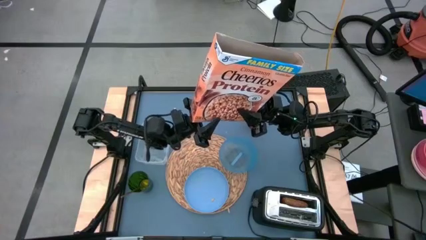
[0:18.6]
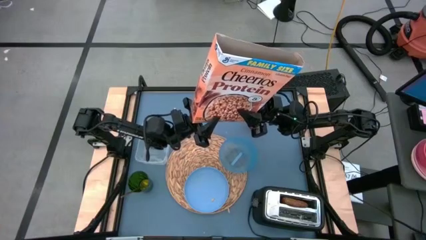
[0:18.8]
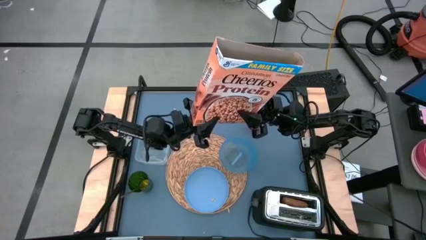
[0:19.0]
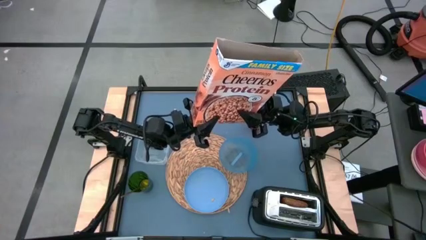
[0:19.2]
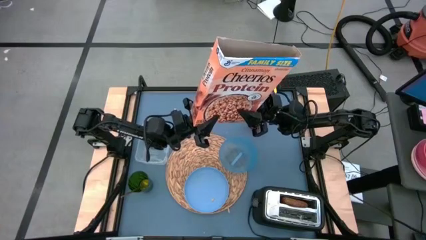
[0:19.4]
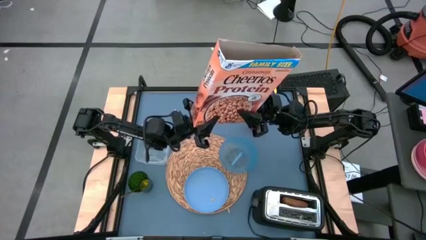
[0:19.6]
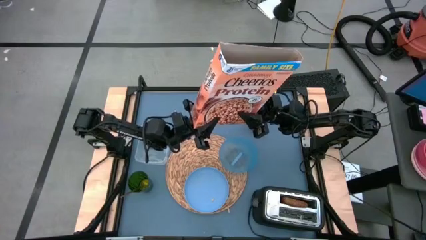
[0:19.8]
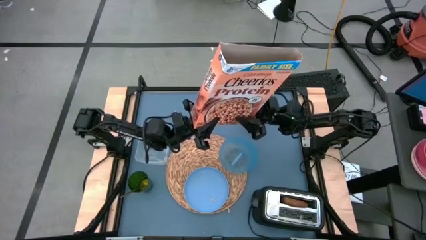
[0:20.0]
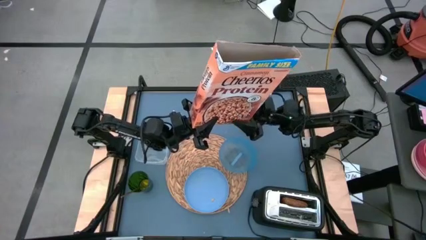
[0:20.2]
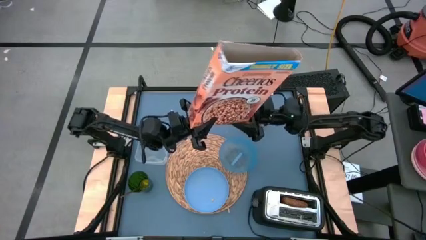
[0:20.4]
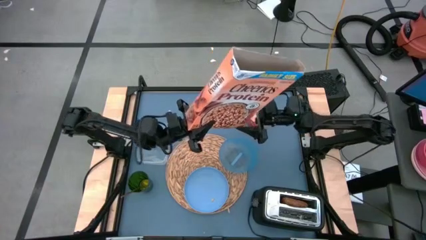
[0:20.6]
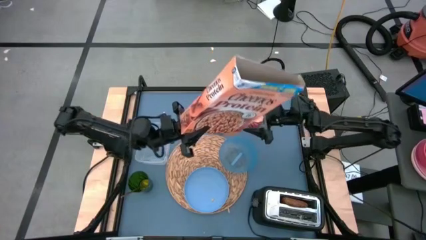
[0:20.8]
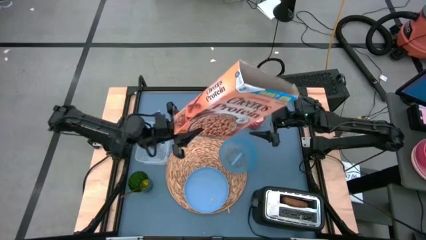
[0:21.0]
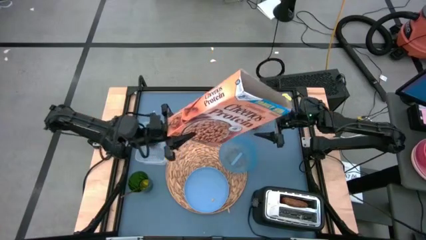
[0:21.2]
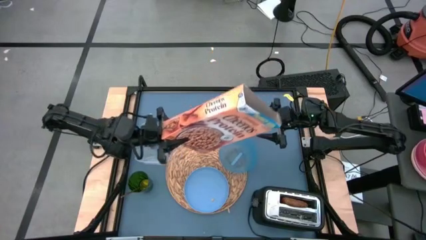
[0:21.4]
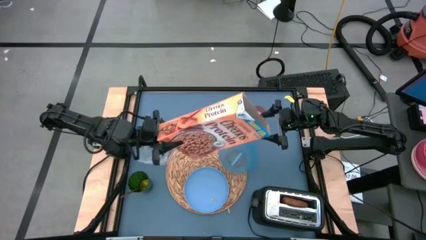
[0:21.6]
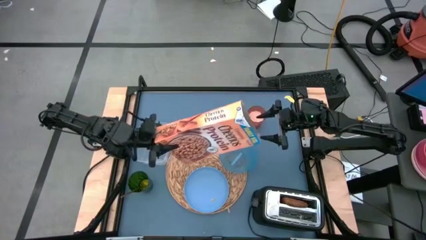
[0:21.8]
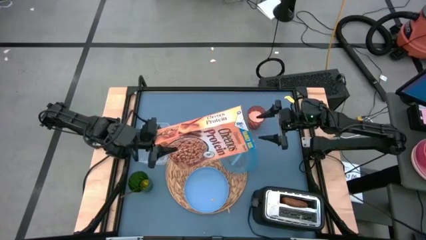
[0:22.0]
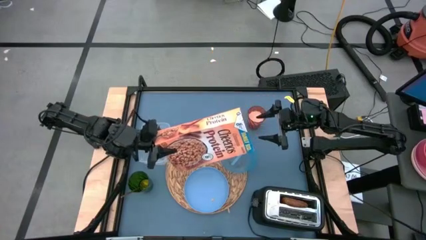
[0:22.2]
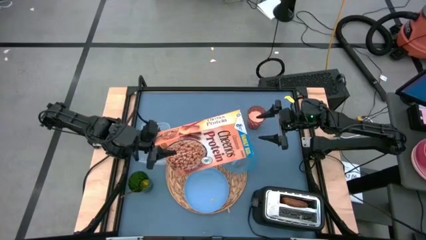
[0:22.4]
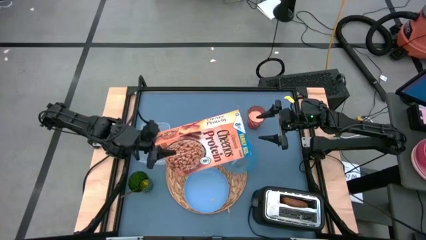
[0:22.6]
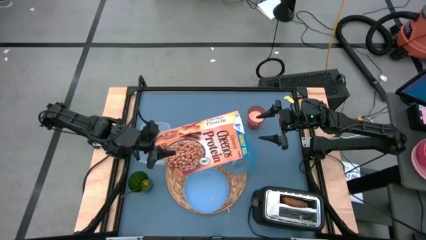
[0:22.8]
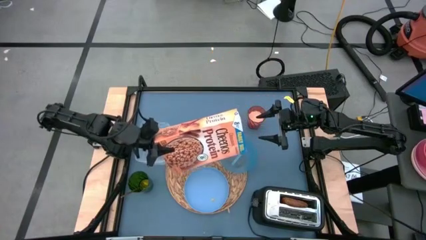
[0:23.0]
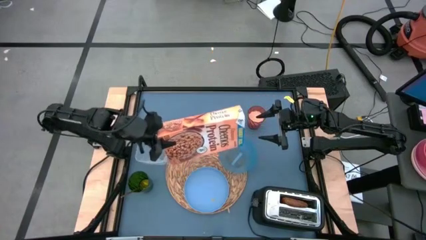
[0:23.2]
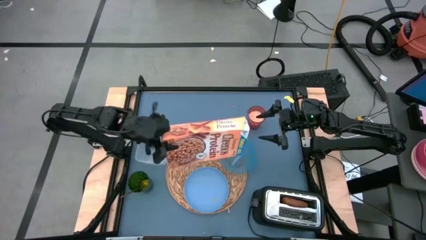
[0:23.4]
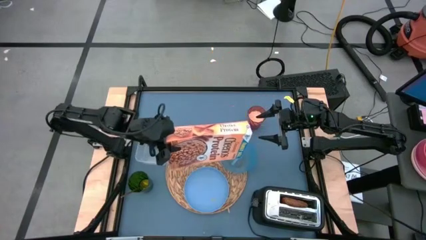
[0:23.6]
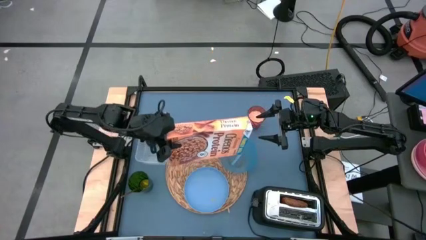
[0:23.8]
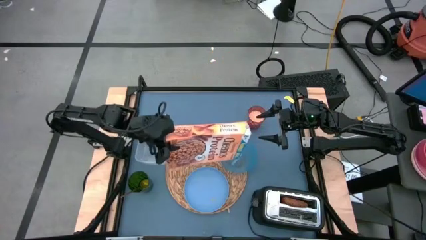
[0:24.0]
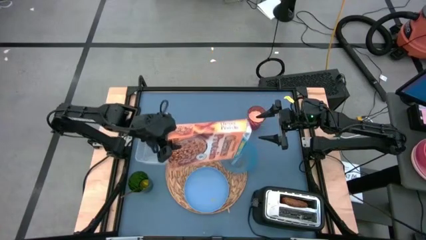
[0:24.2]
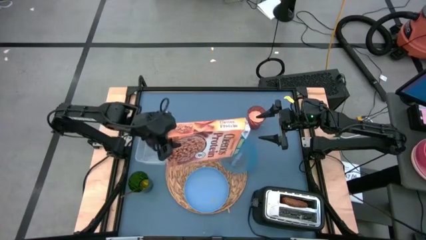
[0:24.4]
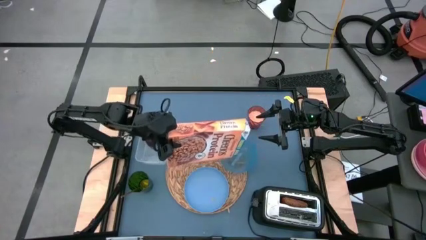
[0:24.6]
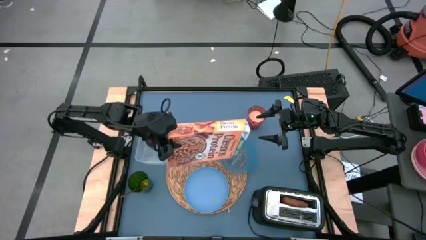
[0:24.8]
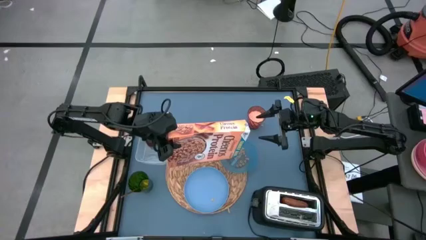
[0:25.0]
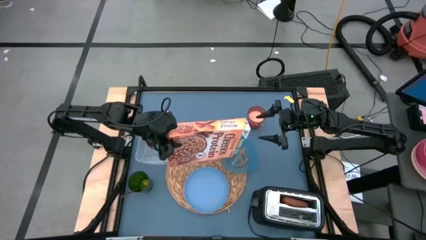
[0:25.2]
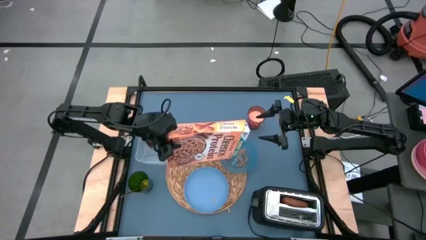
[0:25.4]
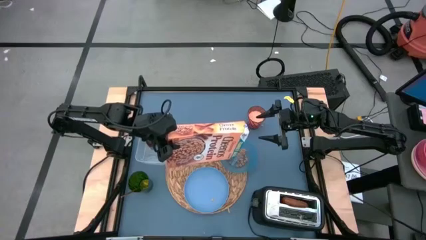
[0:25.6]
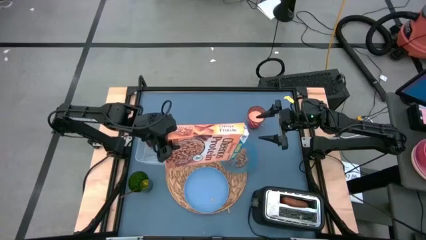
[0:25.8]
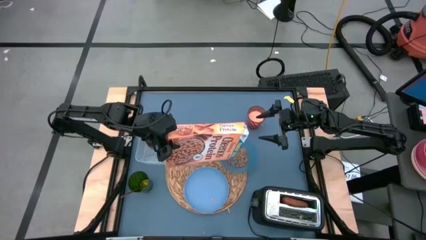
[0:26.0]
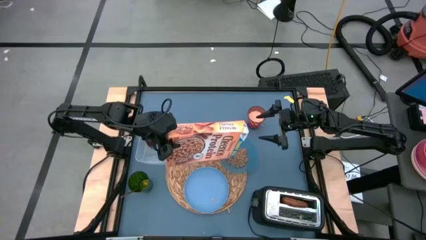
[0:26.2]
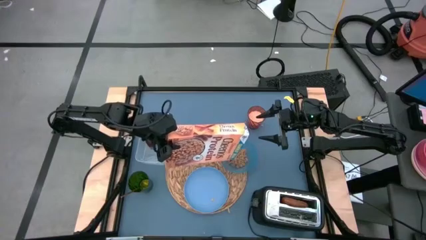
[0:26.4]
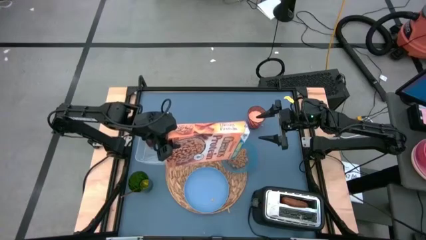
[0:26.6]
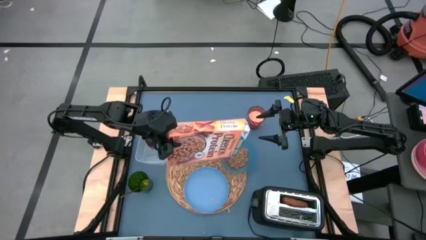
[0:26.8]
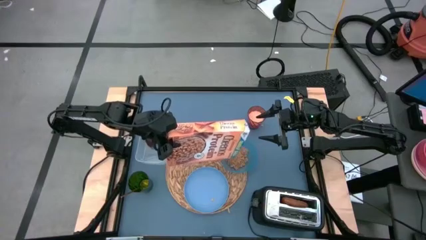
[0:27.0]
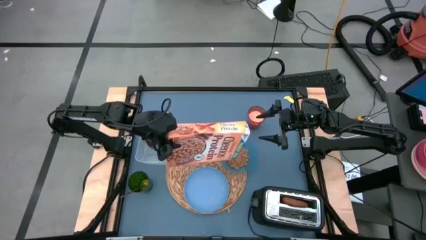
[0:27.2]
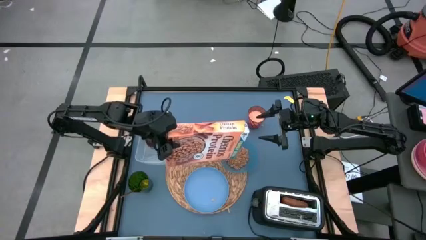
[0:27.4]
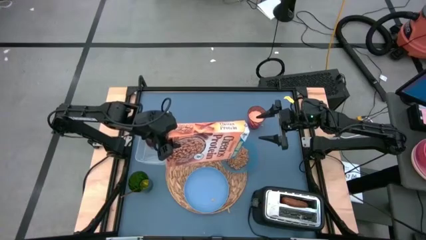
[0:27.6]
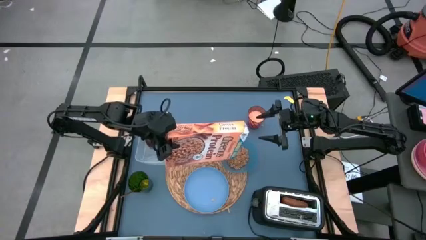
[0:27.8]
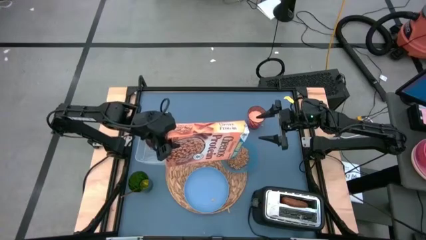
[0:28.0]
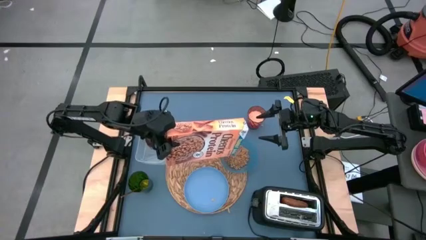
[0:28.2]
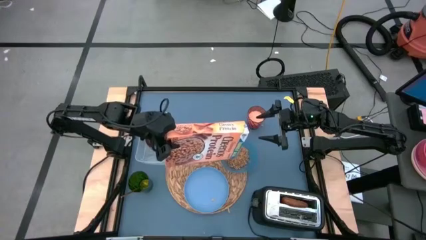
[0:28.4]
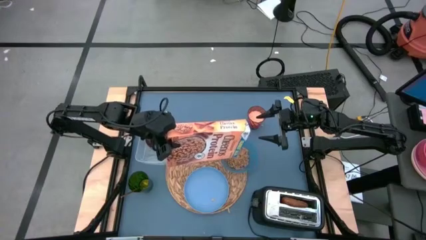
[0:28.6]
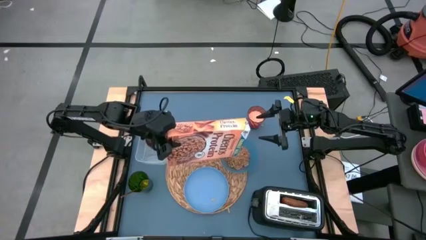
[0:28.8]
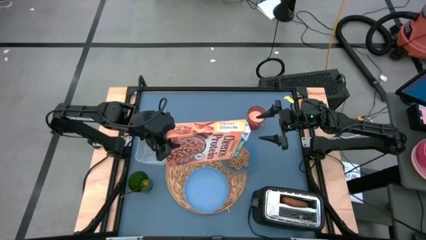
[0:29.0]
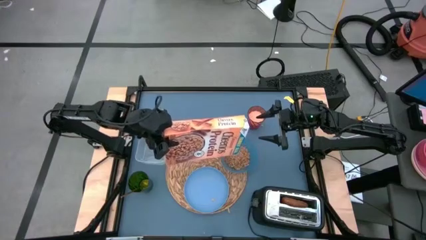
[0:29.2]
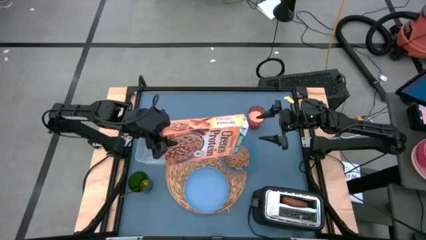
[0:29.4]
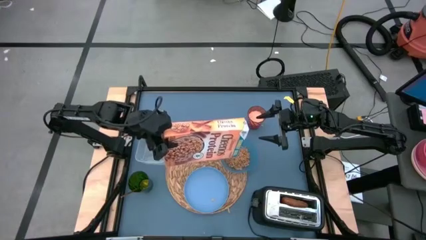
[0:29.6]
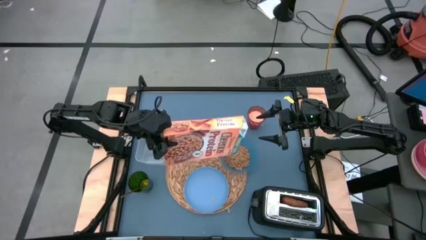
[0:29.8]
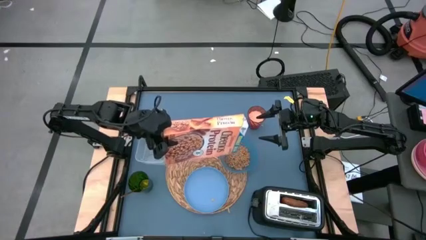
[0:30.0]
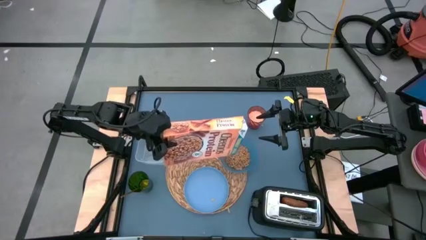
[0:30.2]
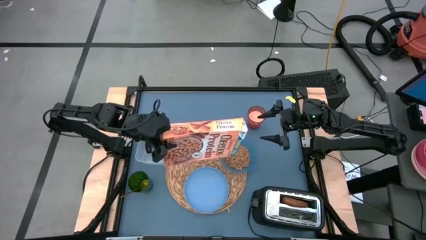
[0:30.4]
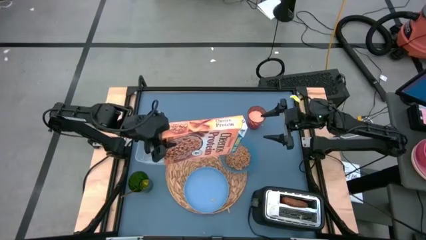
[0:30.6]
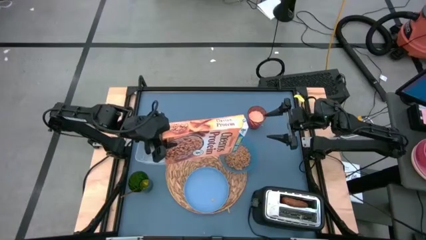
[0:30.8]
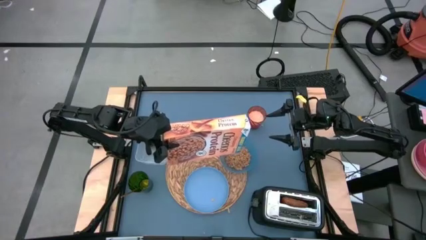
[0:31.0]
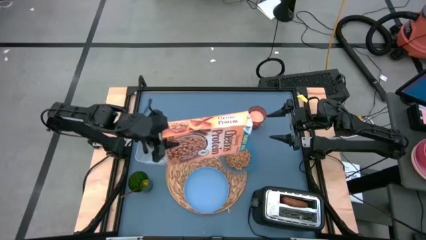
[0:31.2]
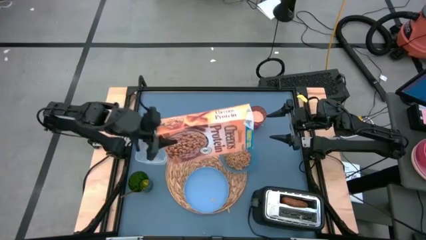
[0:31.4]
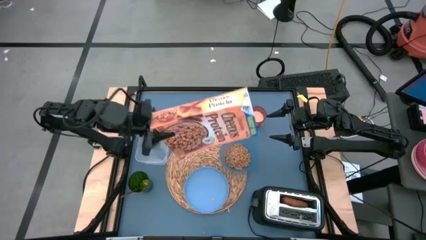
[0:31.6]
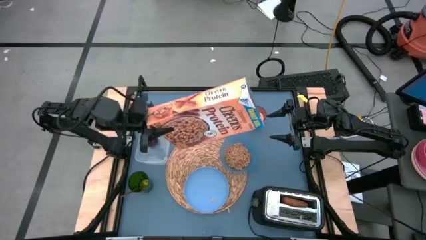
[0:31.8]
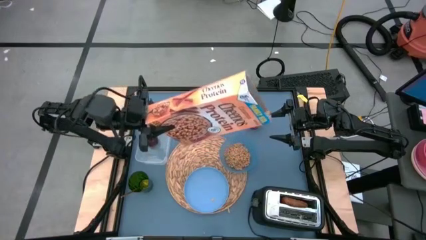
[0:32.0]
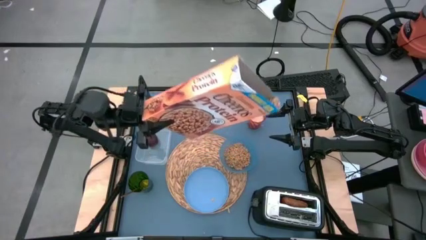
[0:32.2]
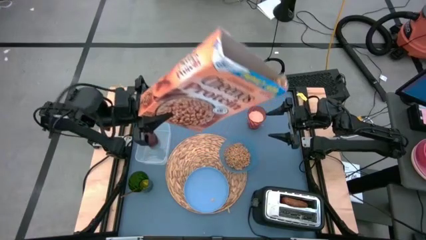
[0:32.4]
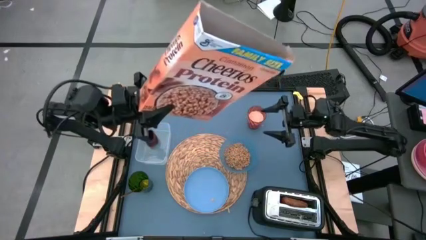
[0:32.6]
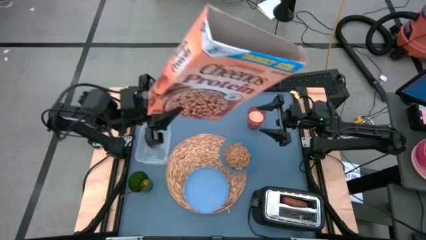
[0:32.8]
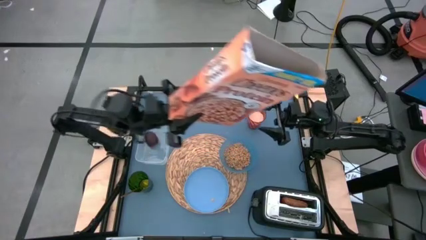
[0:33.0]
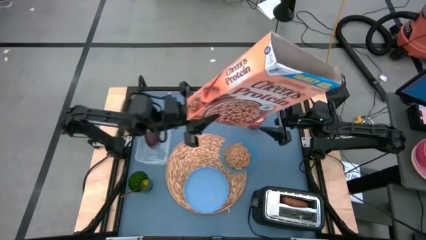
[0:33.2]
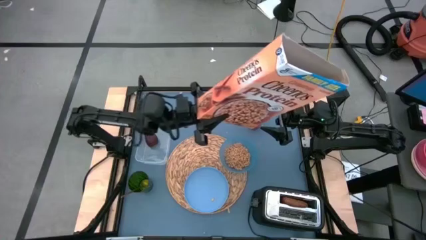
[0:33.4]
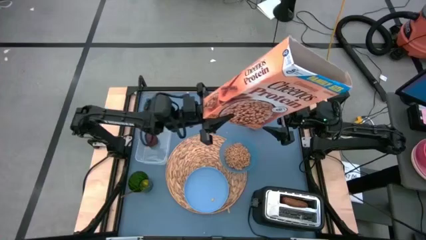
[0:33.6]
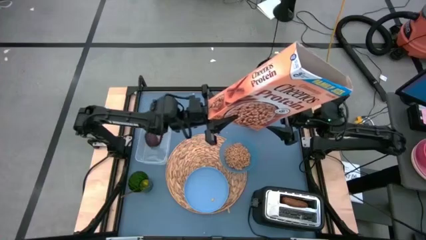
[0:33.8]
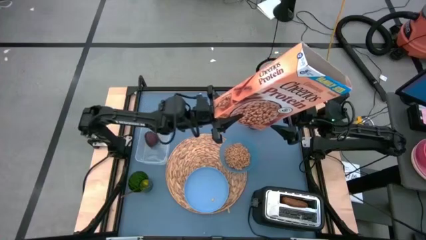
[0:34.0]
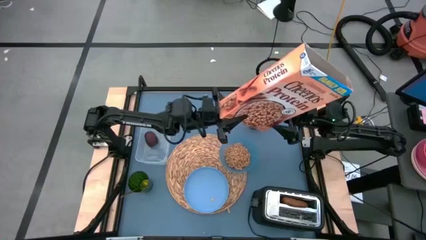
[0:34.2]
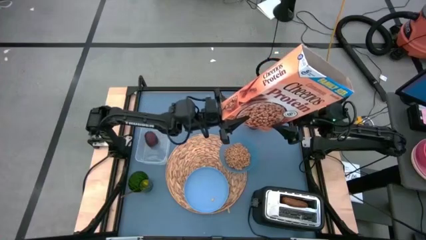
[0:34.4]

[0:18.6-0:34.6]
Task: Arrange a breakfast setting
Pour the cereal into the blue bowl
